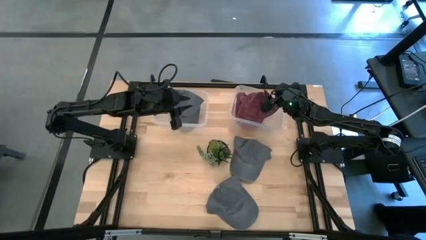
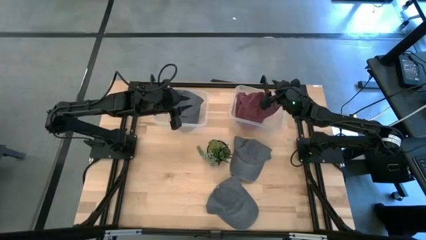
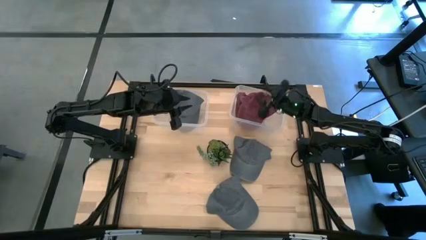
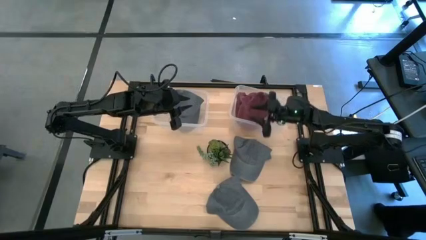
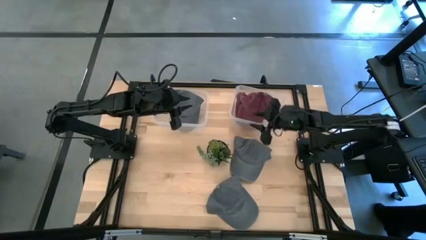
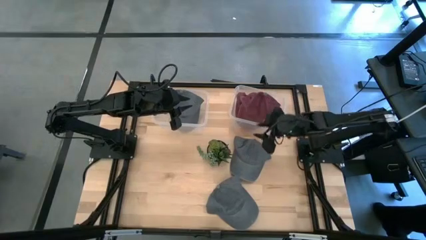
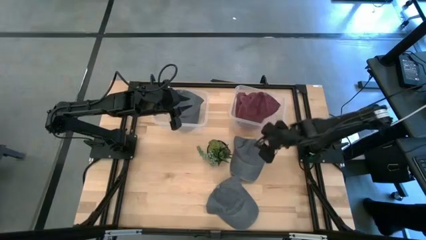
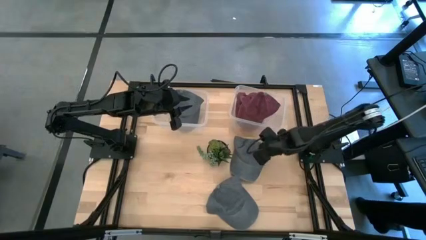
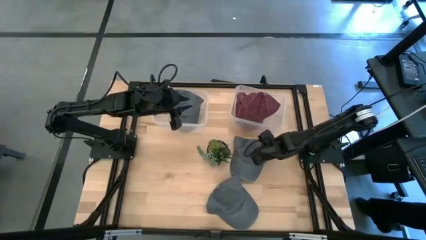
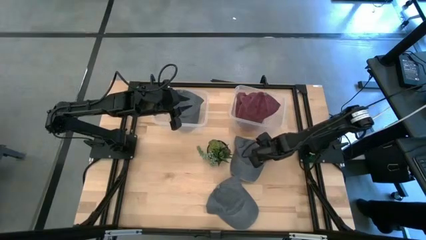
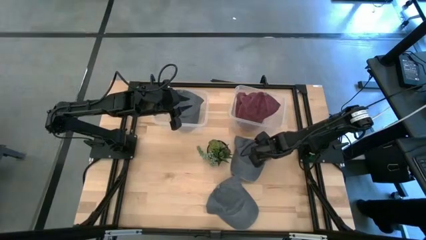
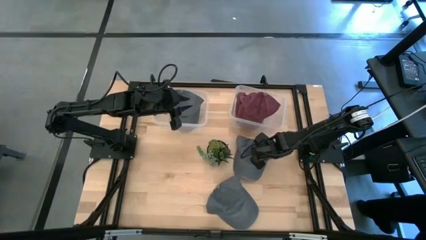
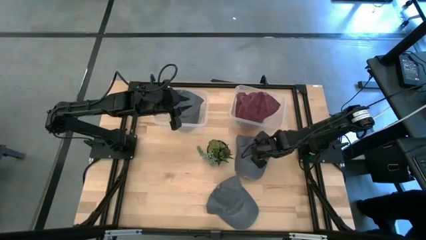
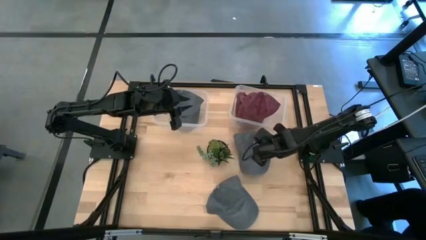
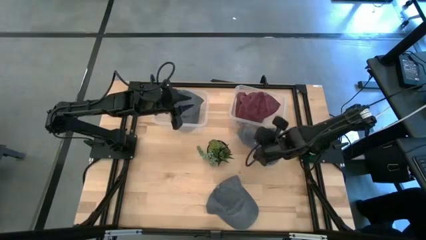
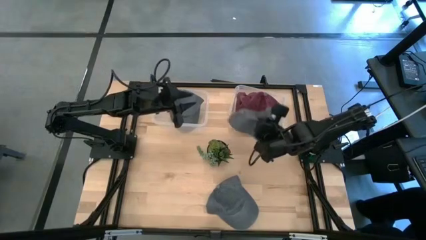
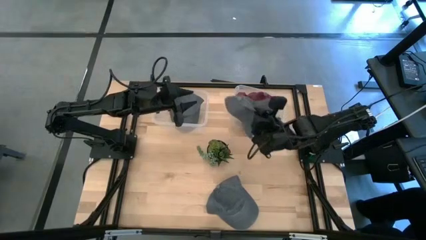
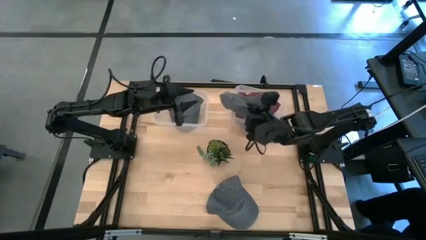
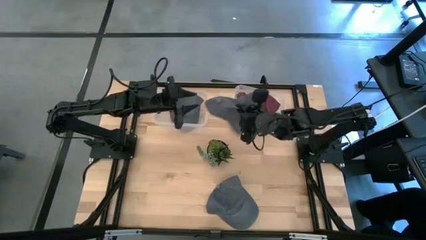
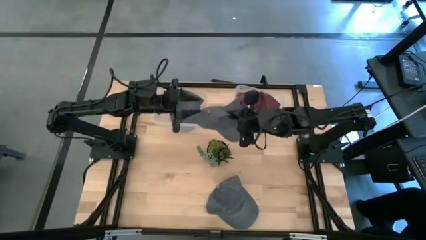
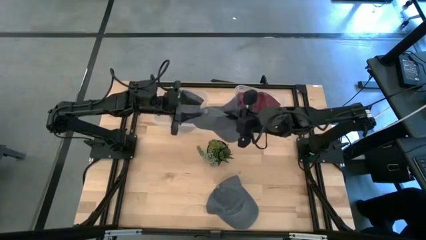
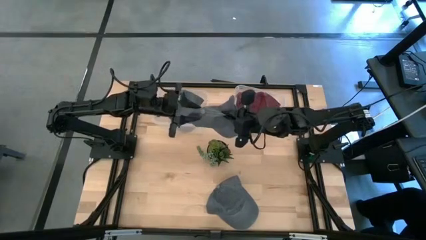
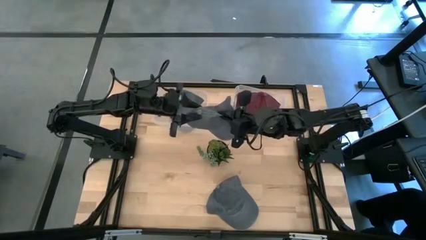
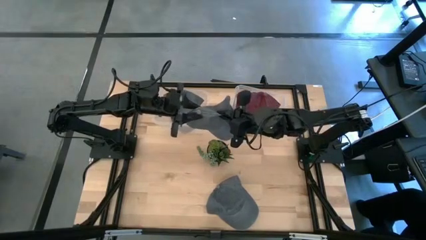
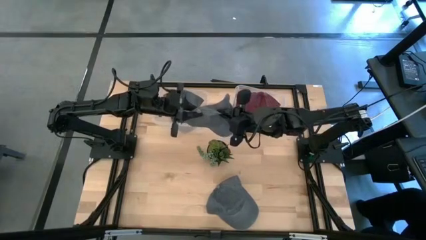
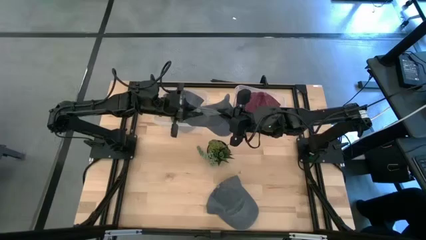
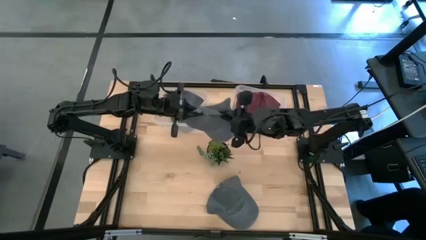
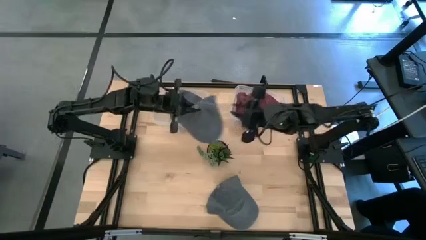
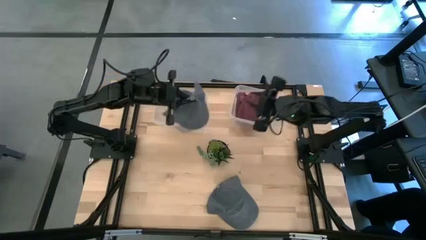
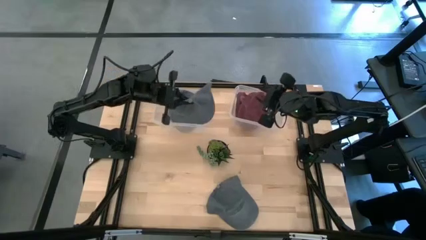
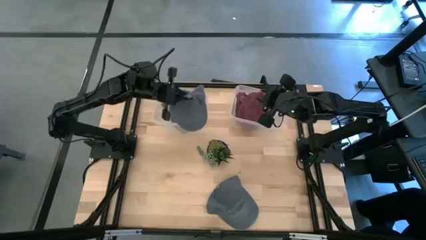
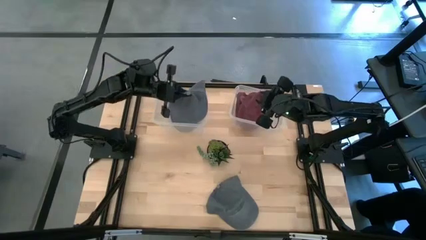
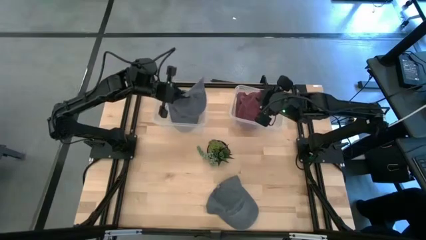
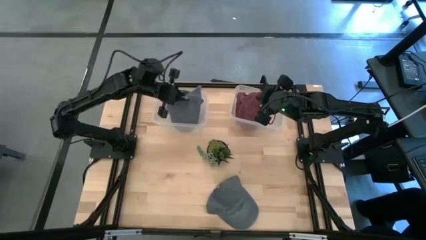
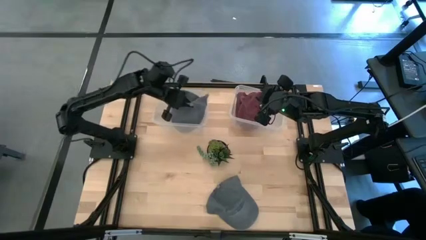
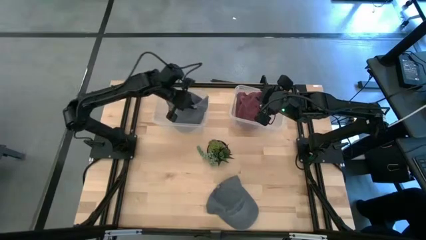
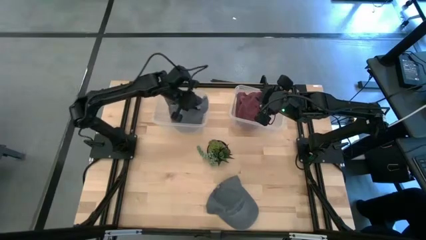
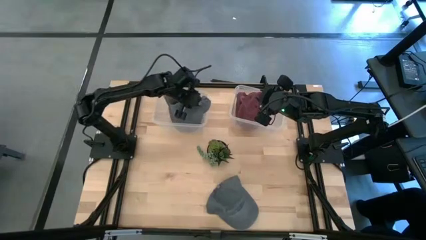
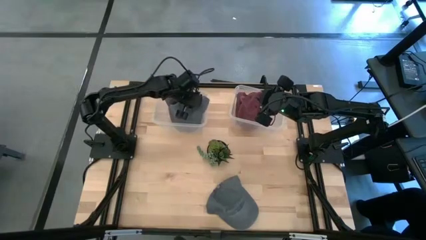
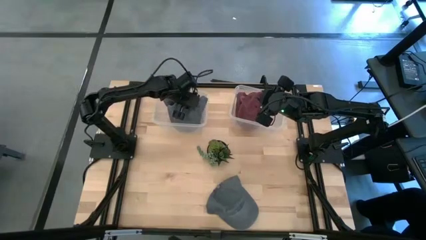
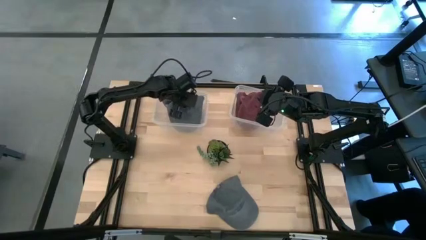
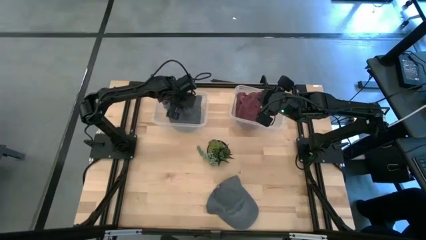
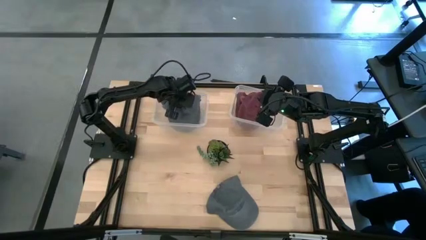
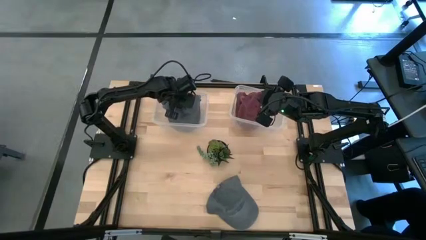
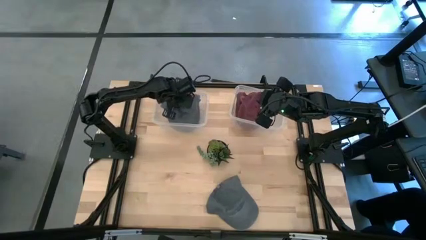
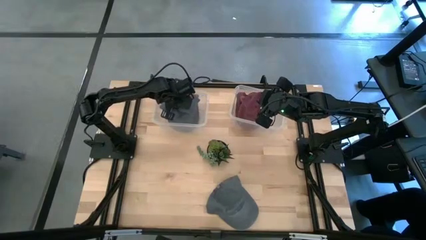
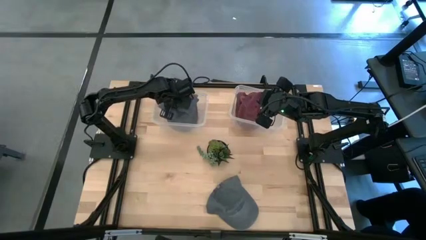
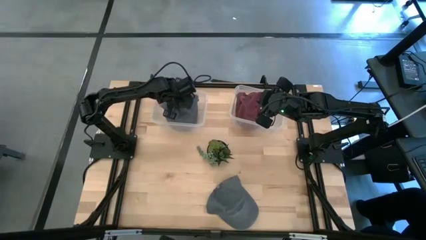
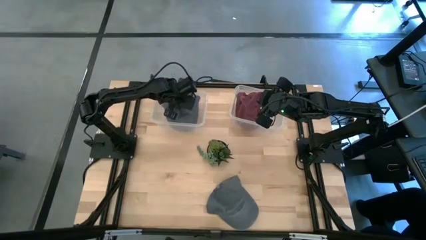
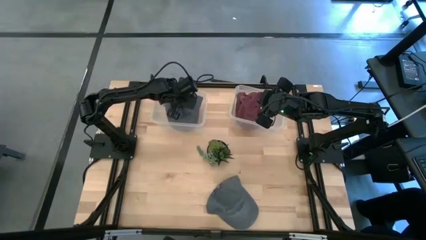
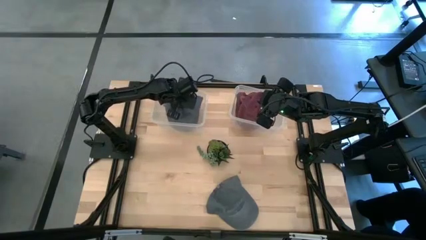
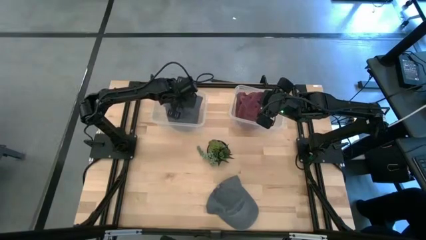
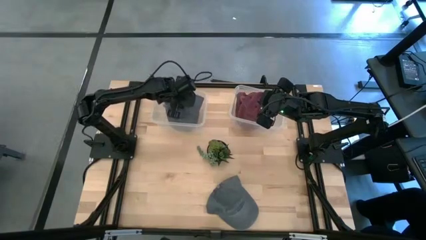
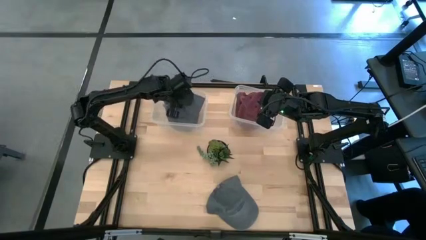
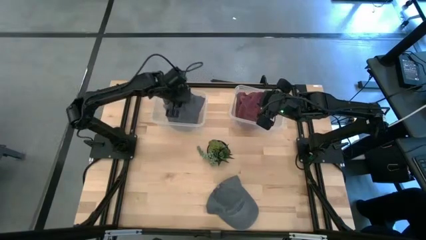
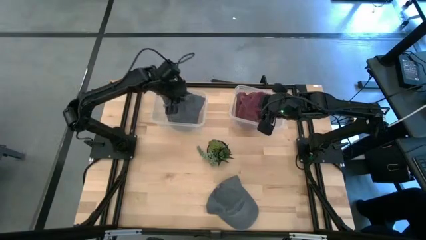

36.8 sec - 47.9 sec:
Task: Pick & Place hat
Put the top gray cap into the left transparent bin
